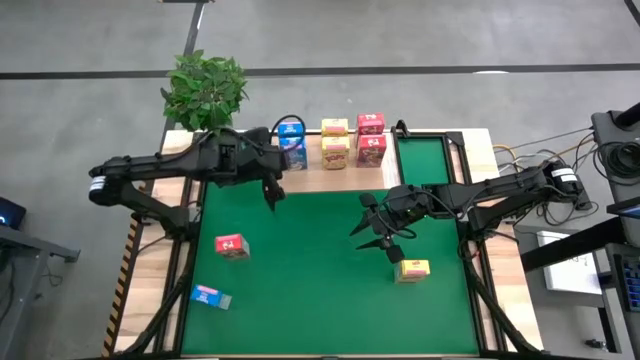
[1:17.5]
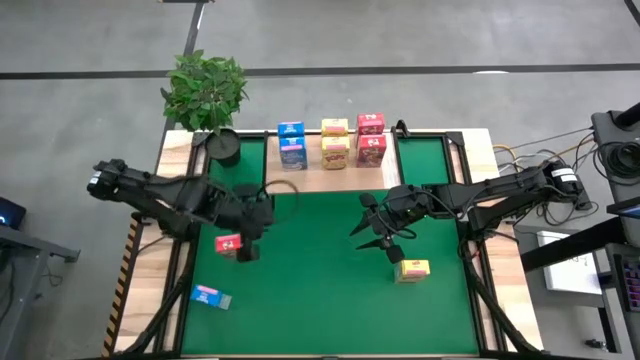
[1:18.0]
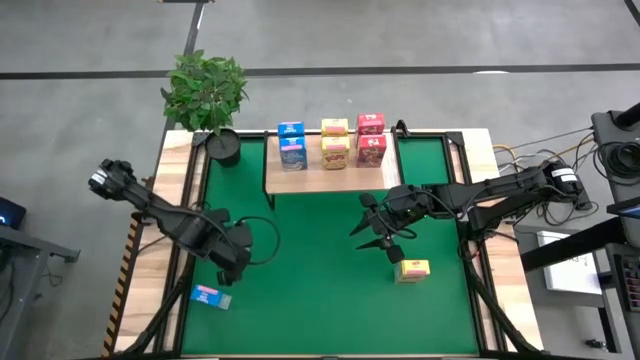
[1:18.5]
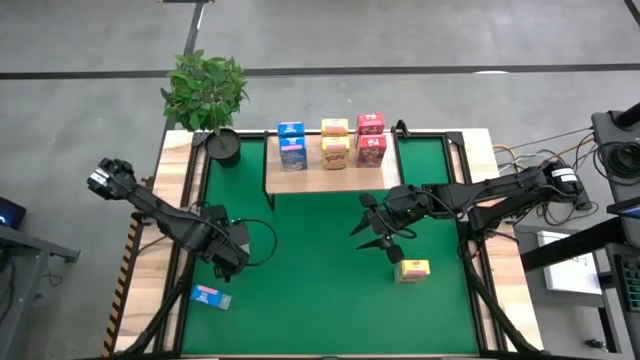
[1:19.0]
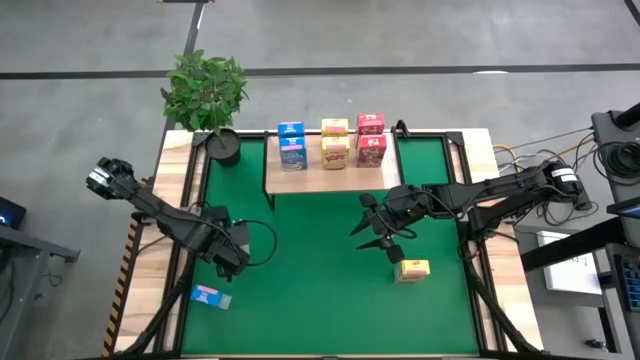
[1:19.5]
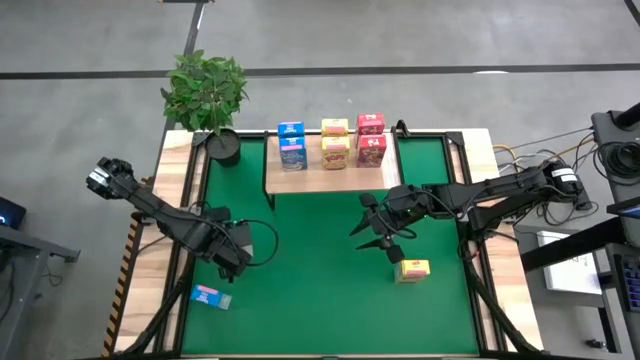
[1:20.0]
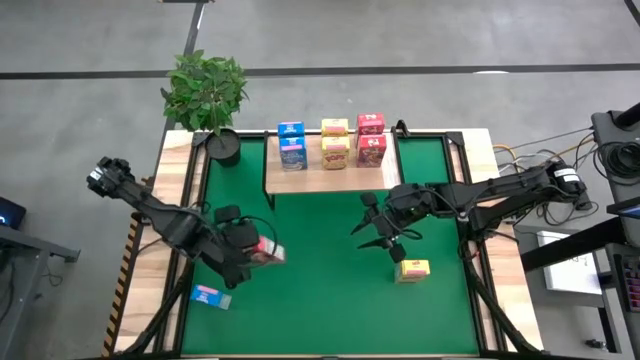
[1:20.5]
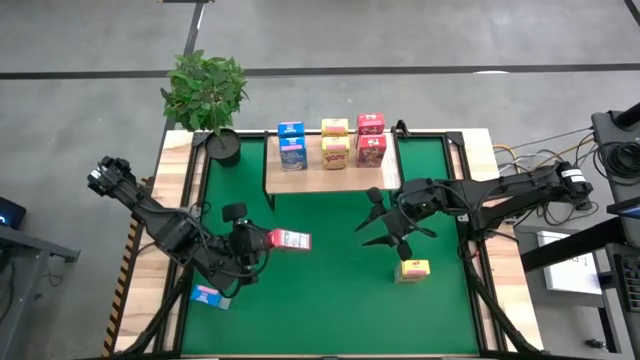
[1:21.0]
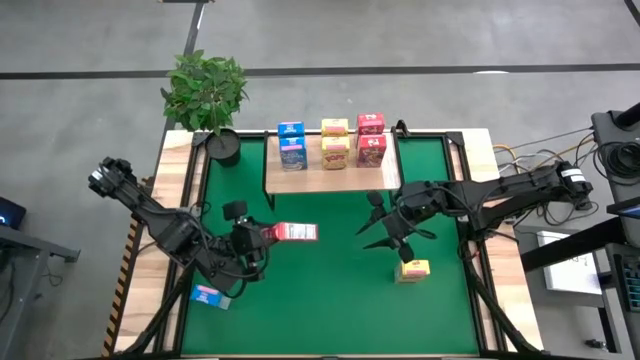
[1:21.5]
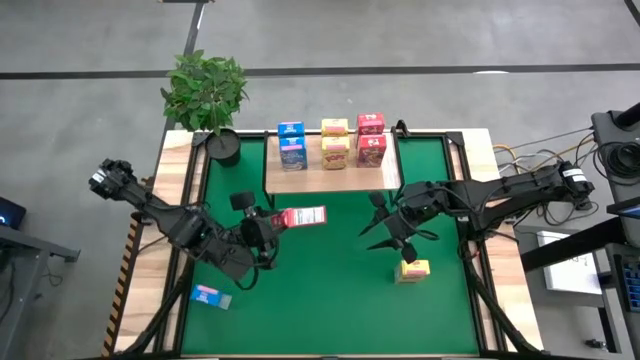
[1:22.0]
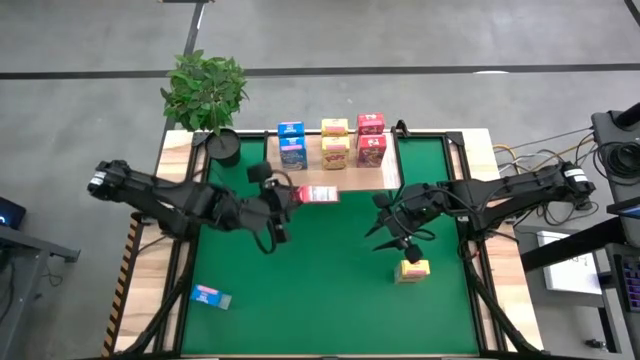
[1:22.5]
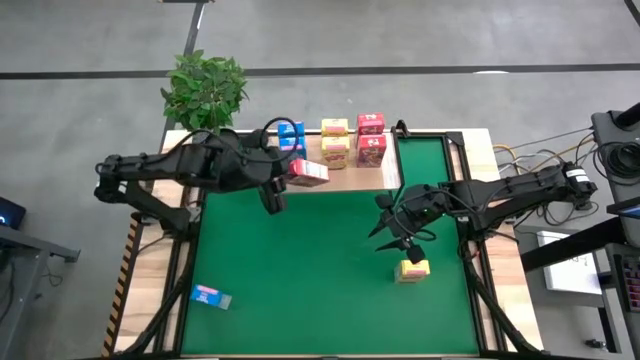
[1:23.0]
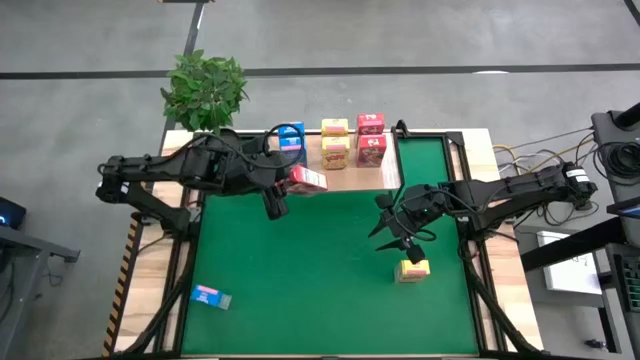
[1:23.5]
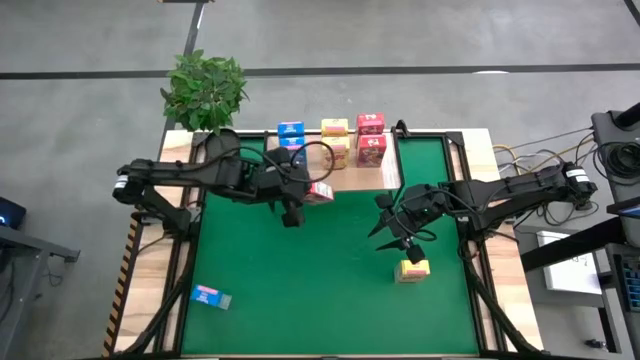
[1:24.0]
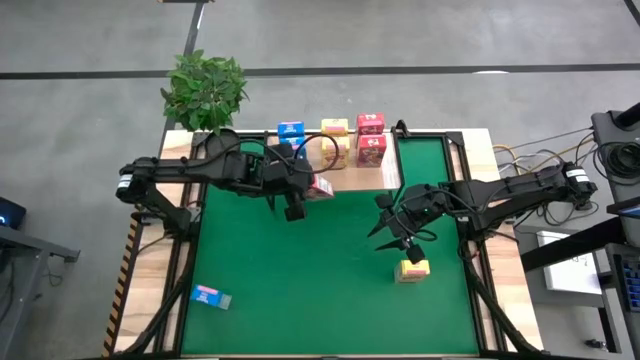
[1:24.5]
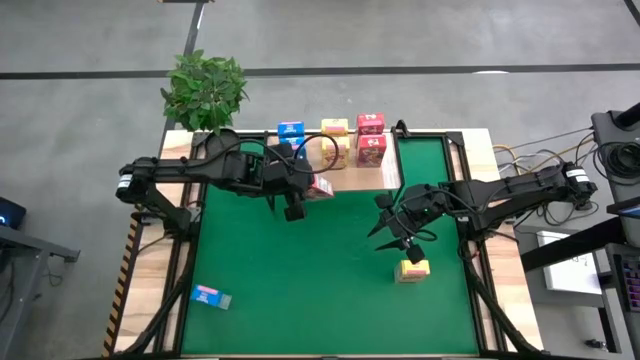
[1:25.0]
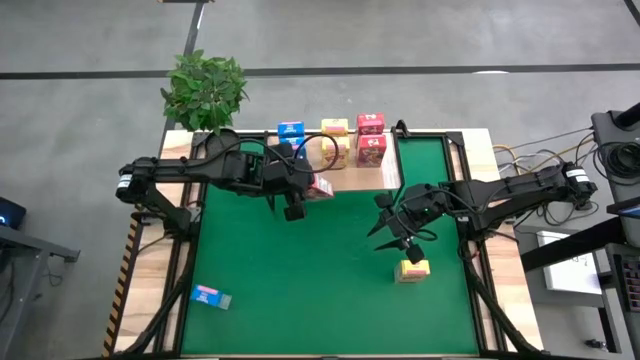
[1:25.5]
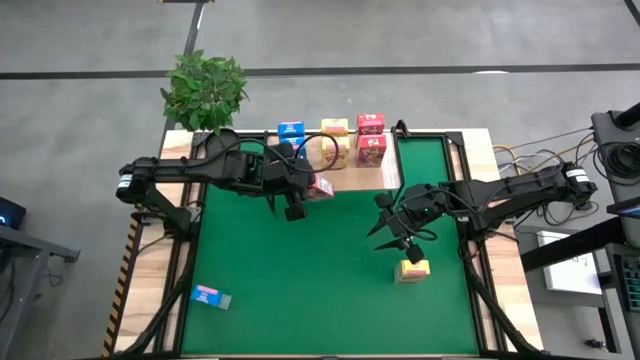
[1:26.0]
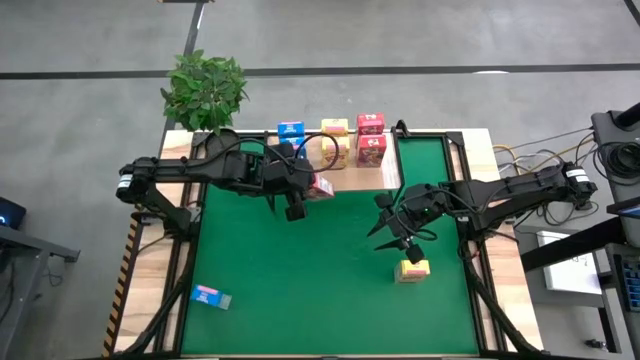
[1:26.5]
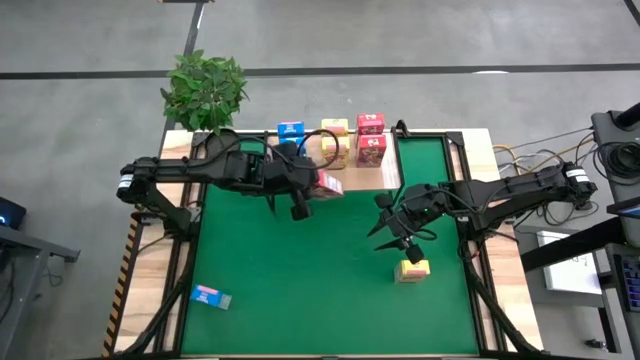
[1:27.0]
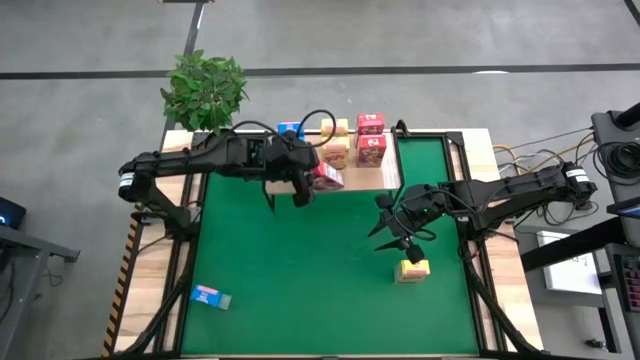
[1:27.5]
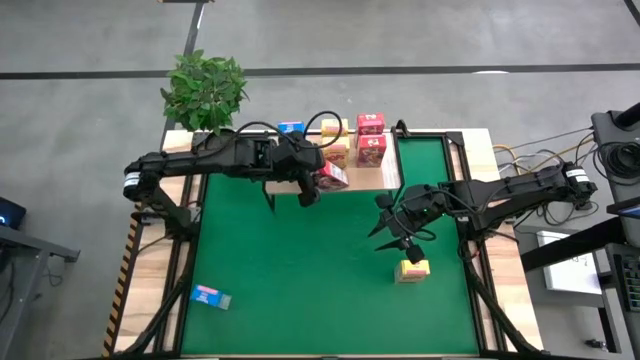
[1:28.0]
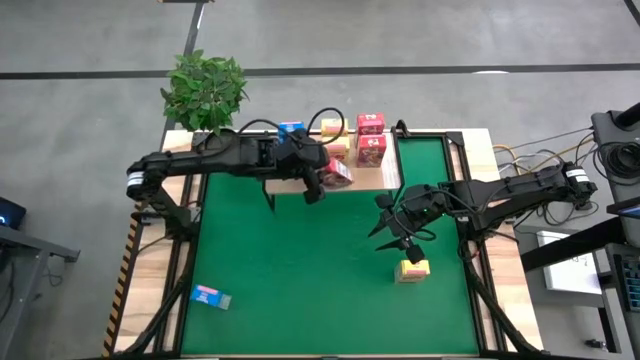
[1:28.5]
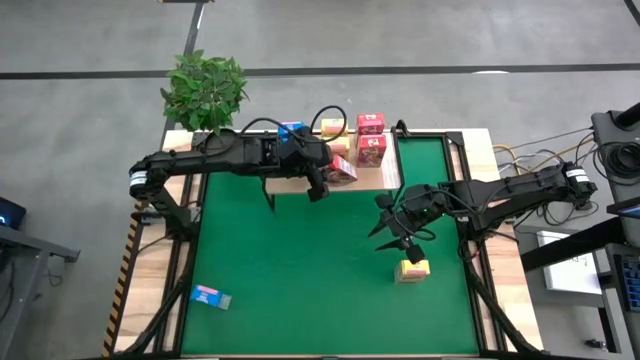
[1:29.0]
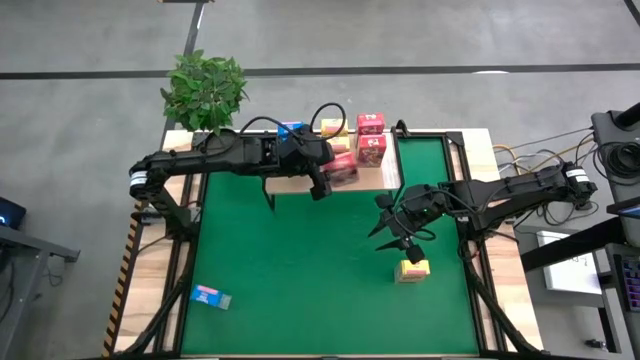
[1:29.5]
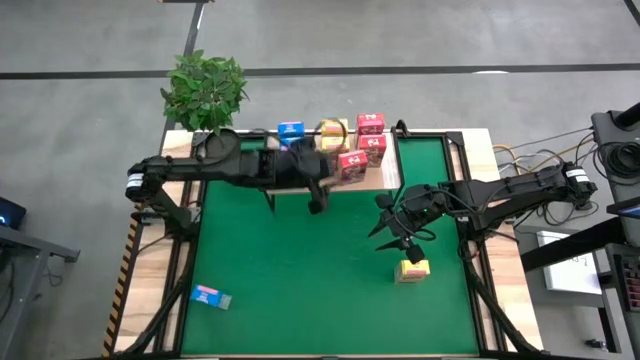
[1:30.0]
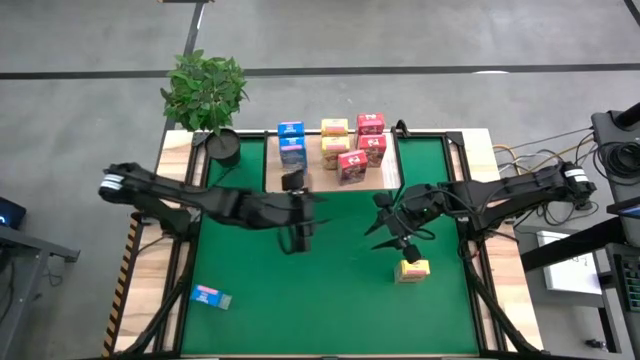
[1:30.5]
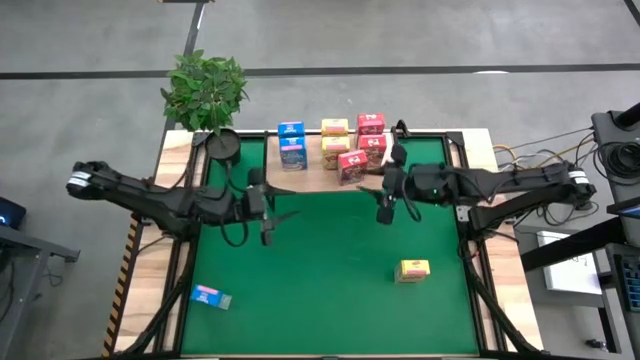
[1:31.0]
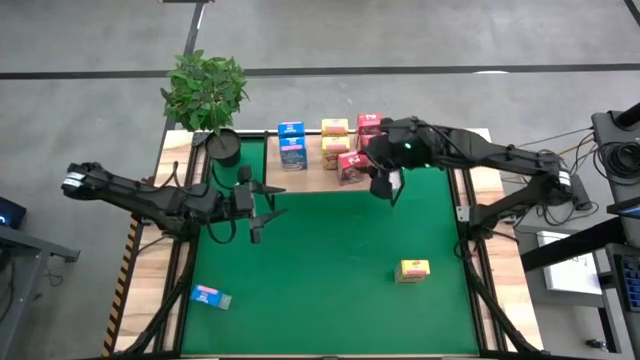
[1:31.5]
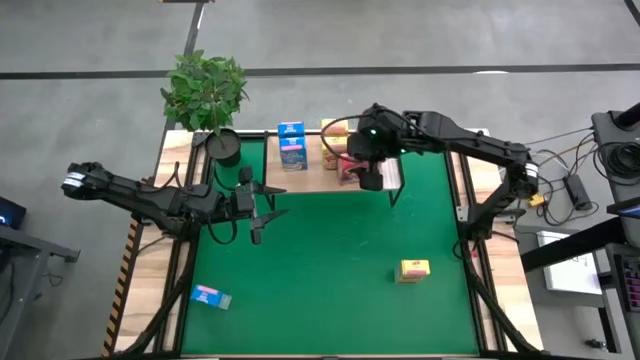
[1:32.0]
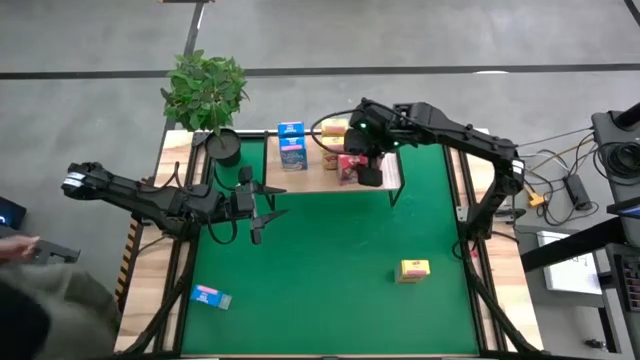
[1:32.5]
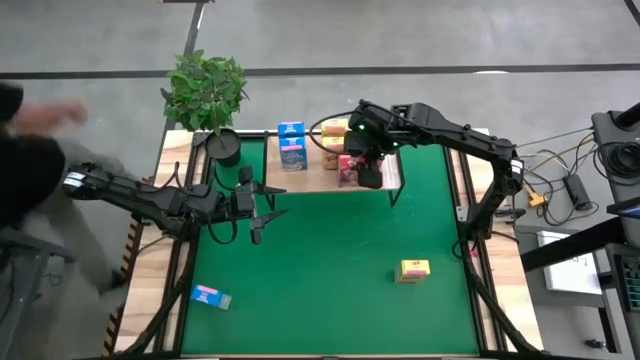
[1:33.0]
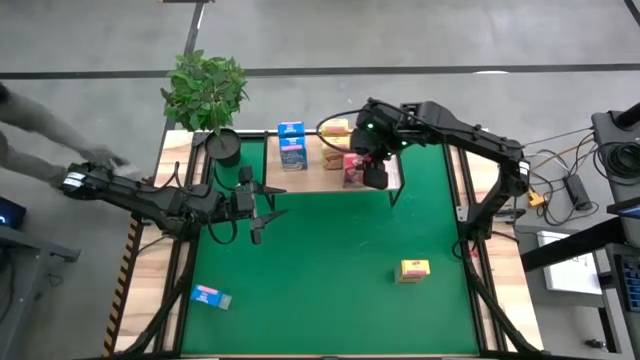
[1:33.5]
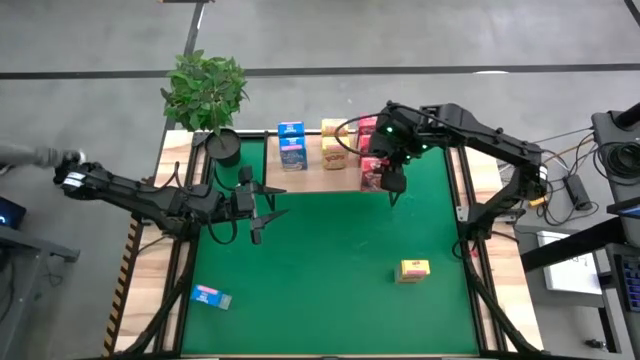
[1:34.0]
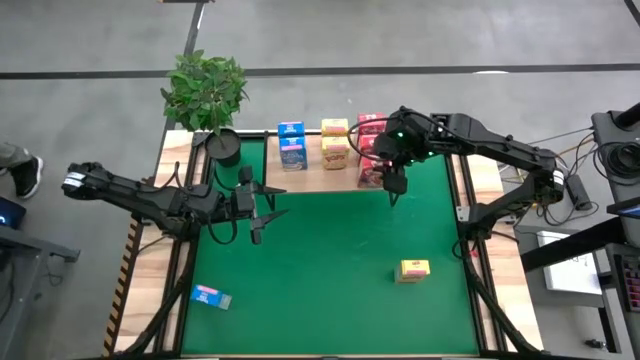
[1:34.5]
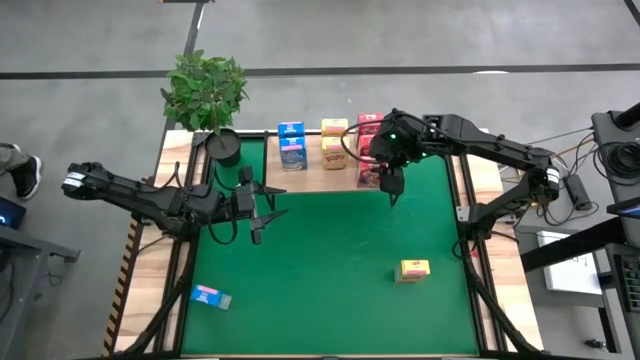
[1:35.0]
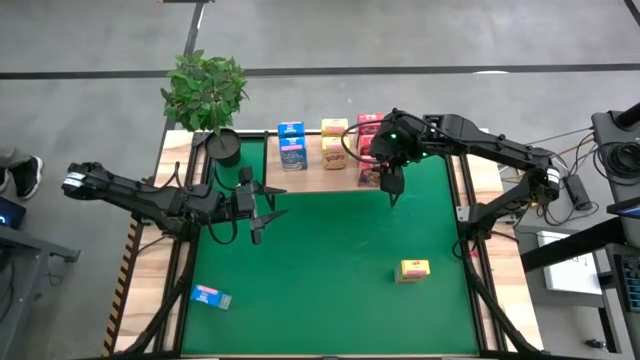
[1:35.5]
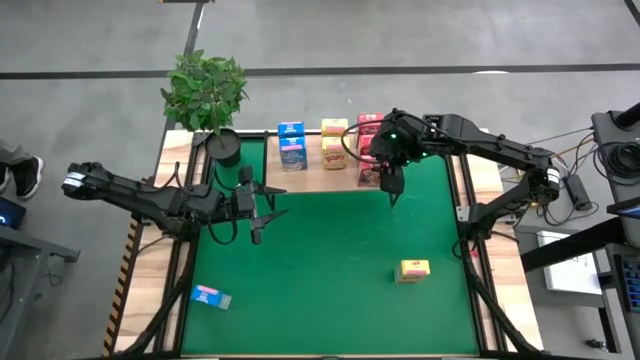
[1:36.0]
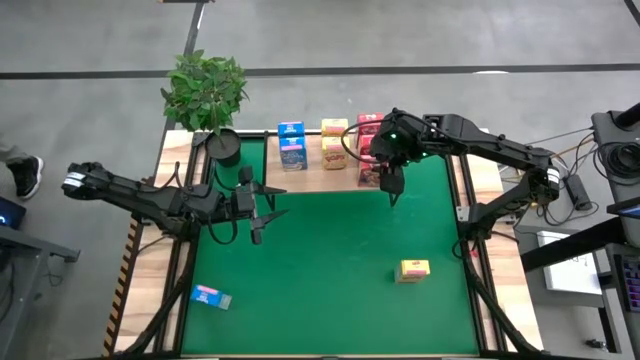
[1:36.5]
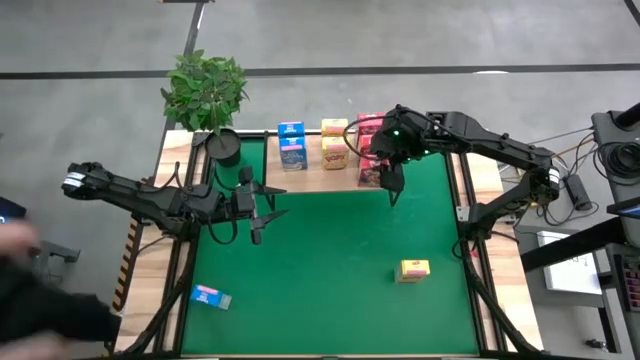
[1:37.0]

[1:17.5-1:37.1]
Task: Stack cereal on shelf
Put the red cereal box on the shelf aligned with the other red cereal boxes

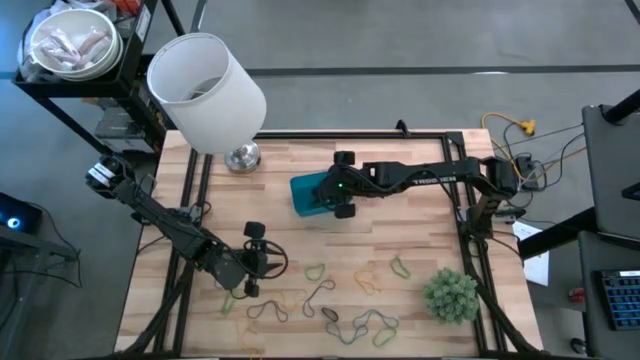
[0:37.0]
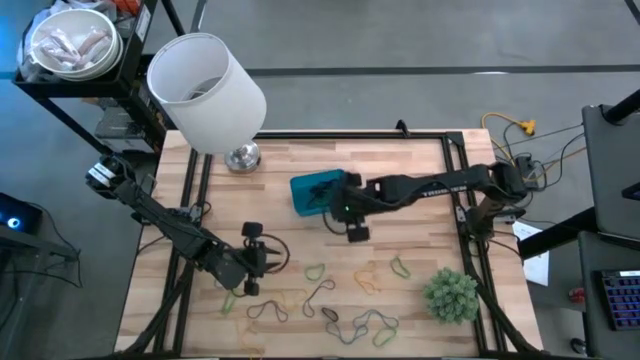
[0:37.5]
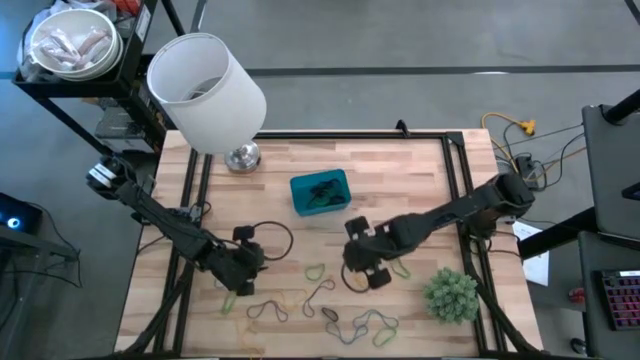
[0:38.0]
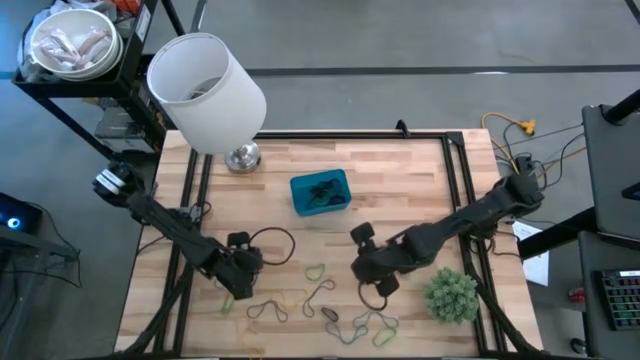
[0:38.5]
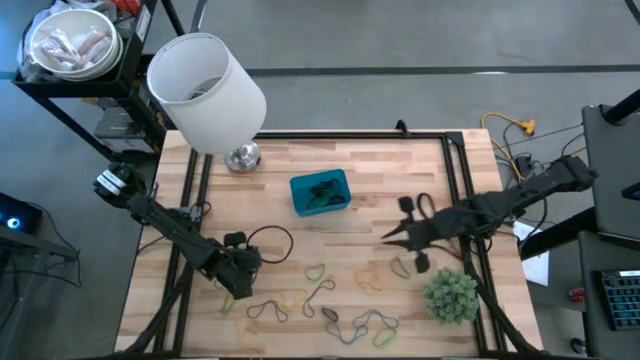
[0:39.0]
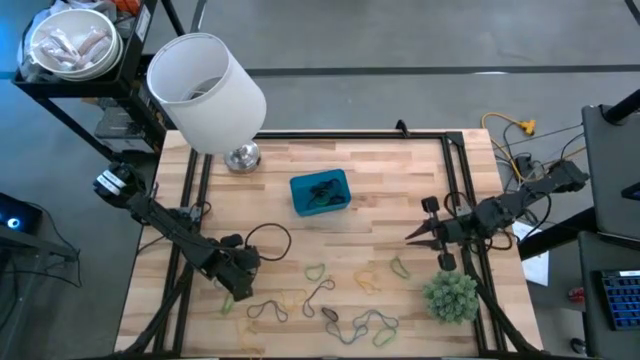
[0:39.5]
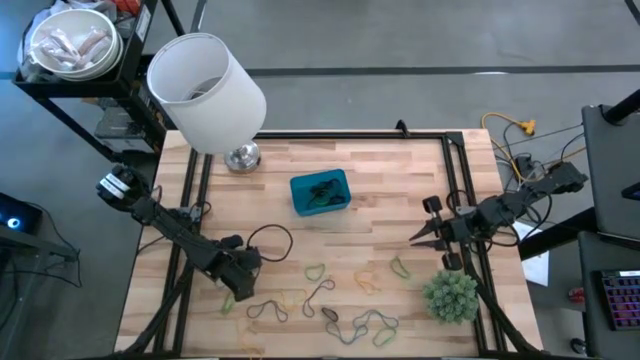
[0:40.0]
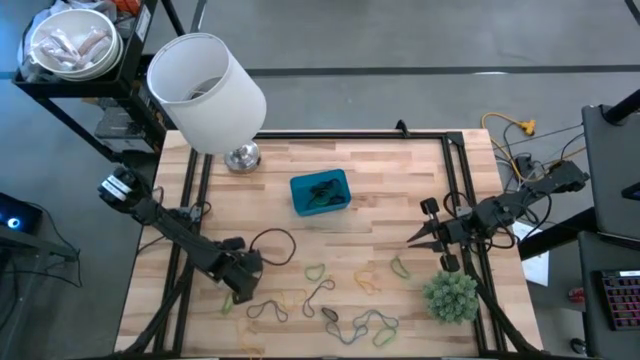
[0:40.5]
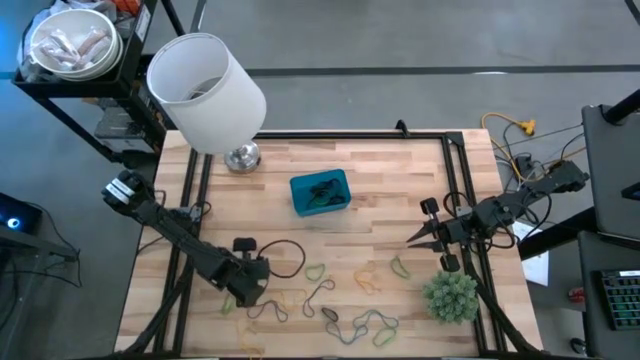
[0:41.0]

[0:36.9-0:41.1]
Task: Pick and place rubber bands into bin
Put the blue rubber band into the blue bin
